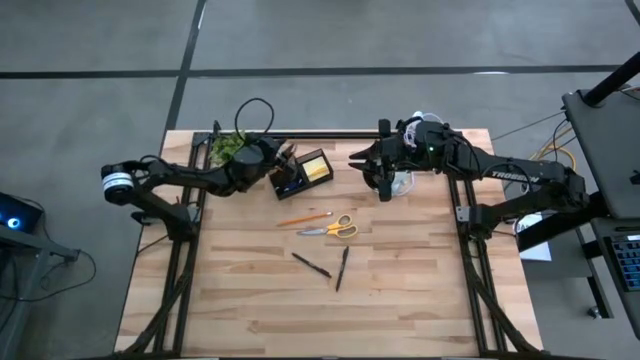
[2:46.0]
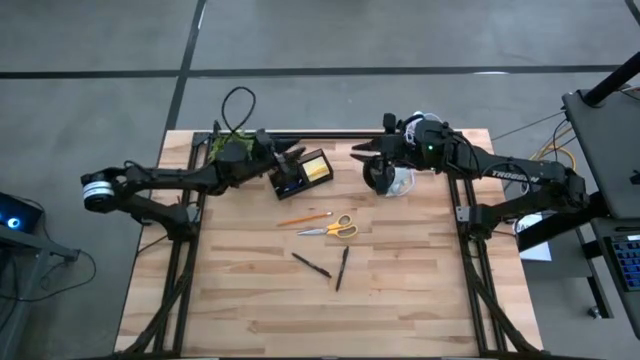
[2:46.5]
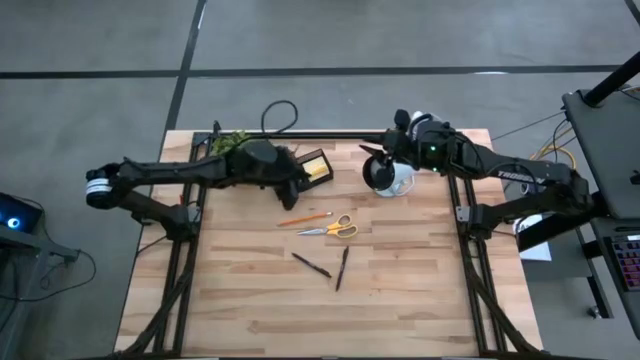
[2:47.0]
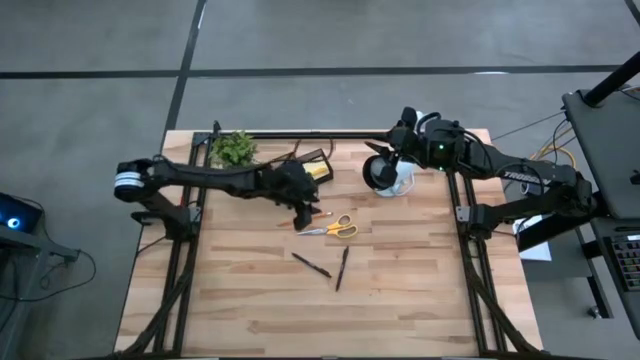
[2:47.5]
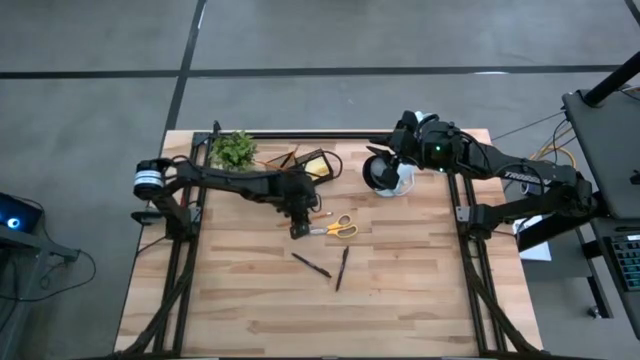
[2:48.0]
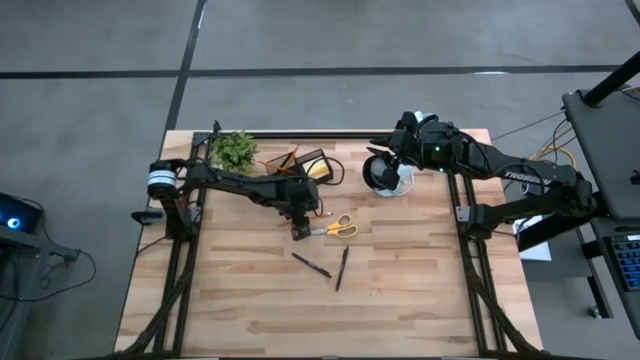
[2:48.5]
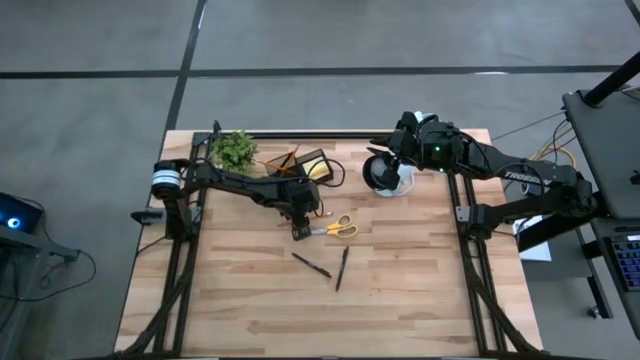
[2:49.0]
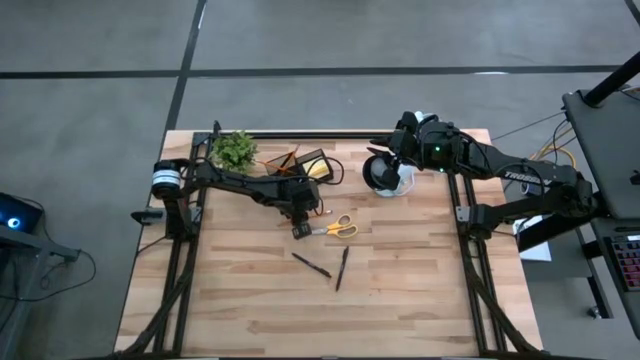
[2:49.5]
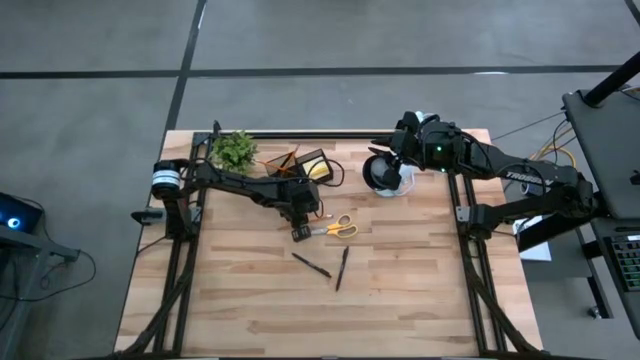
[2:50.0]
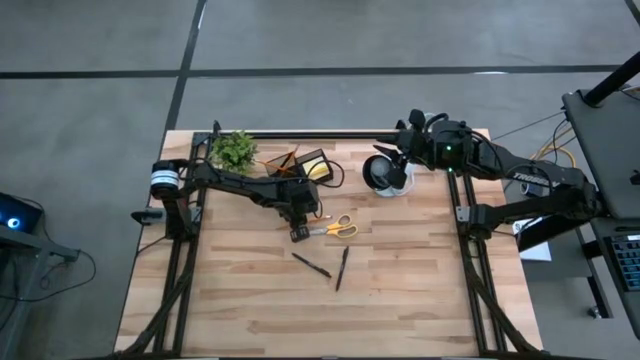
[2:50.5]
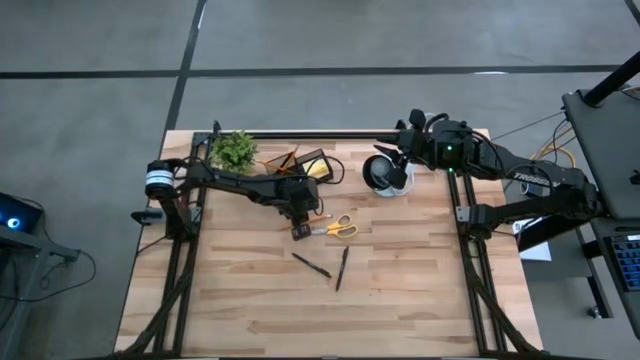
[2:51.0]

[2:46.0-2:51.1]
Task: Pick and place office supplies into organizer
Put the yellow pencil into the black desk organizer

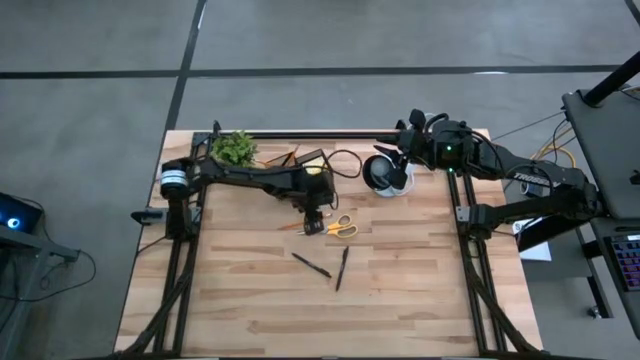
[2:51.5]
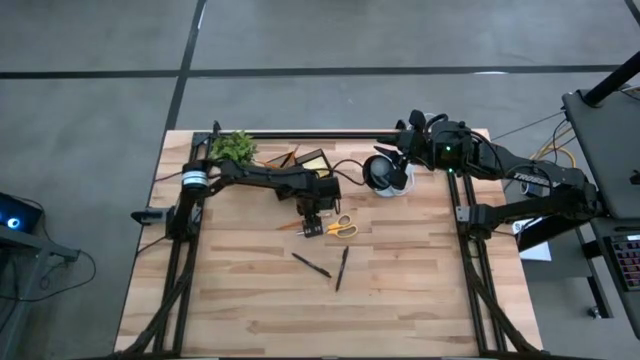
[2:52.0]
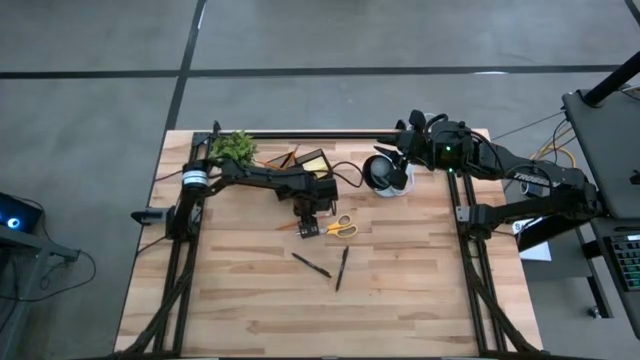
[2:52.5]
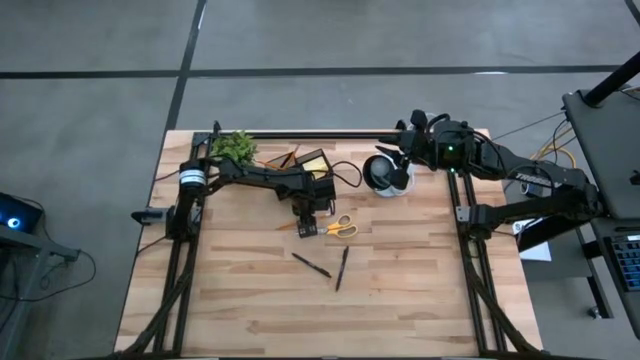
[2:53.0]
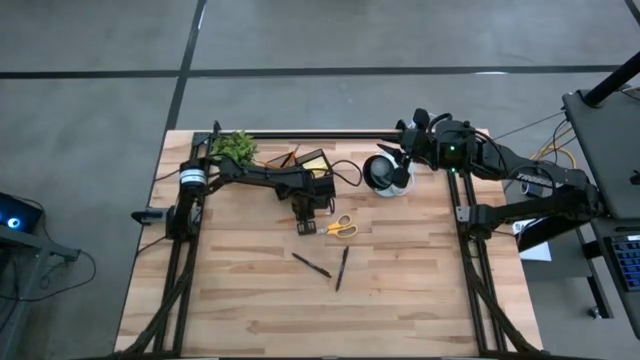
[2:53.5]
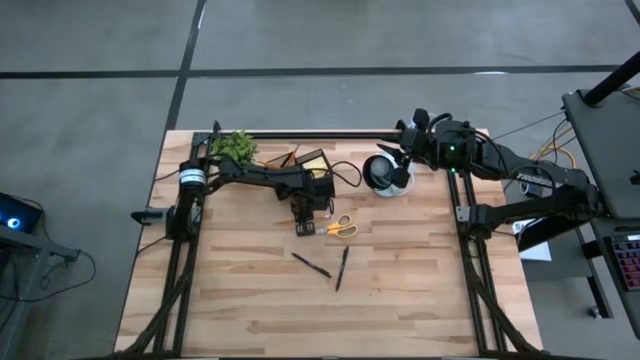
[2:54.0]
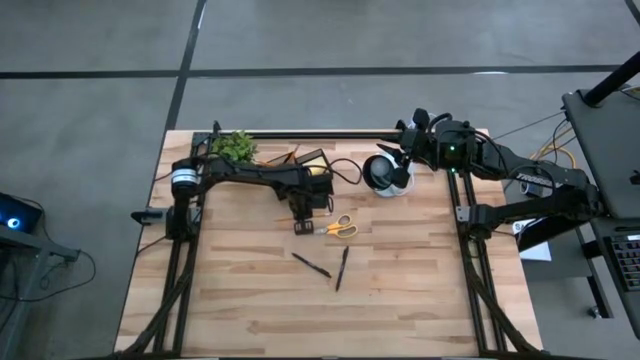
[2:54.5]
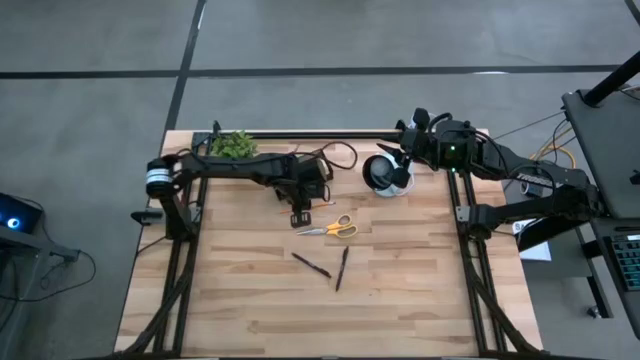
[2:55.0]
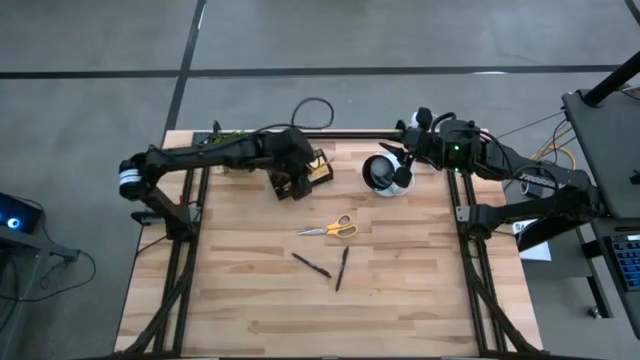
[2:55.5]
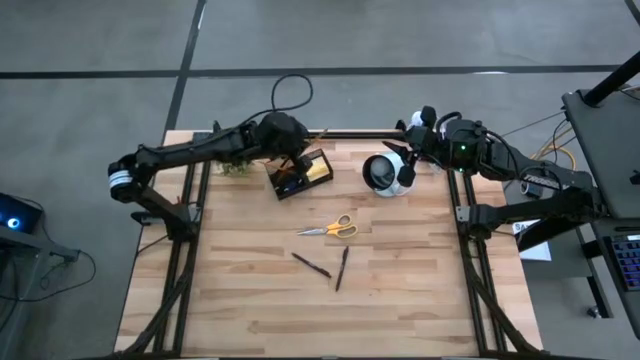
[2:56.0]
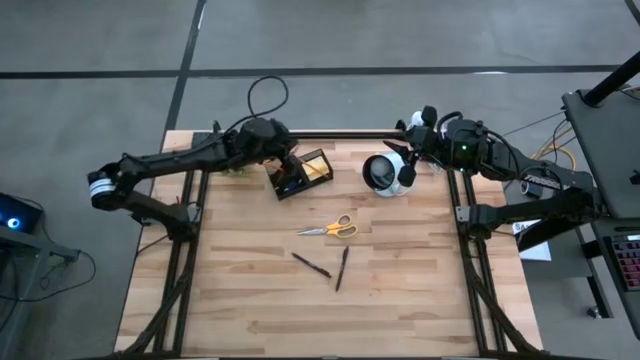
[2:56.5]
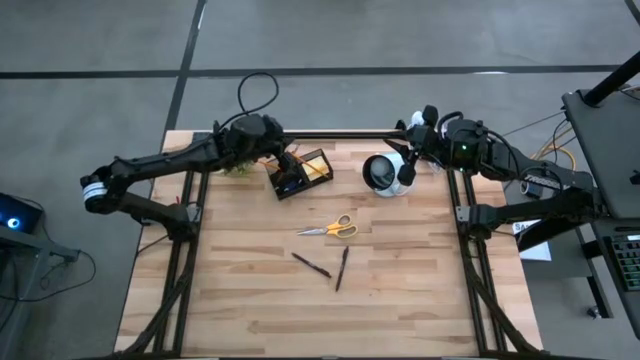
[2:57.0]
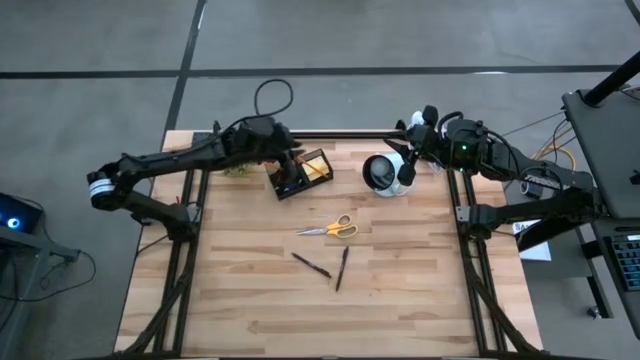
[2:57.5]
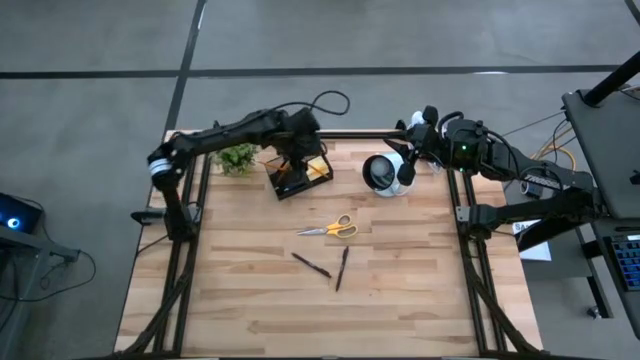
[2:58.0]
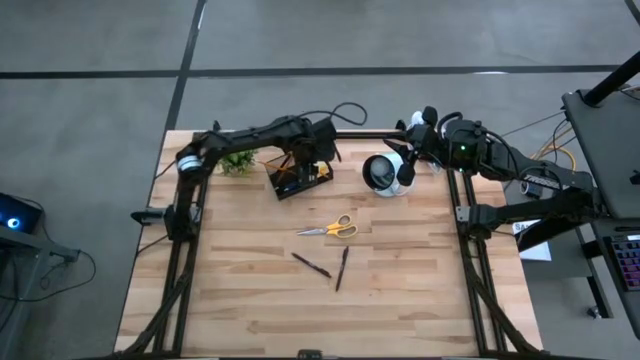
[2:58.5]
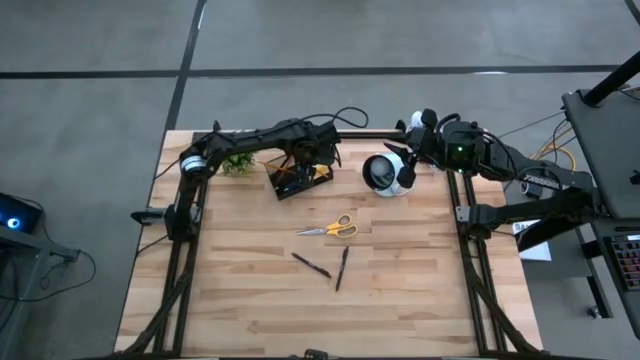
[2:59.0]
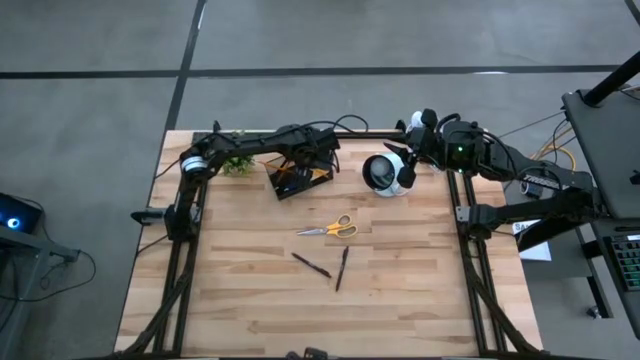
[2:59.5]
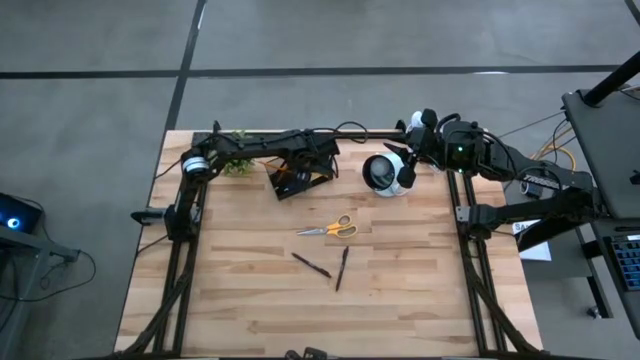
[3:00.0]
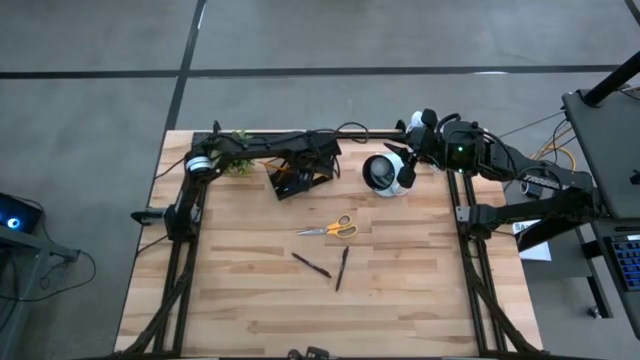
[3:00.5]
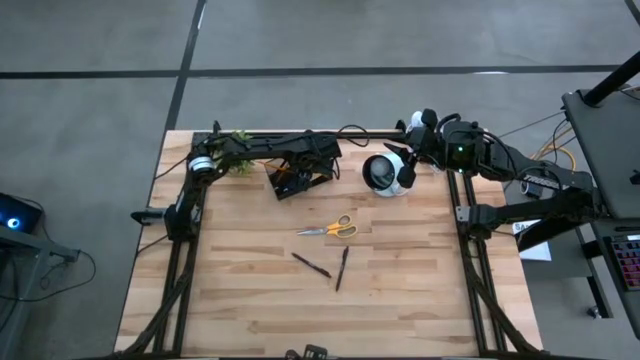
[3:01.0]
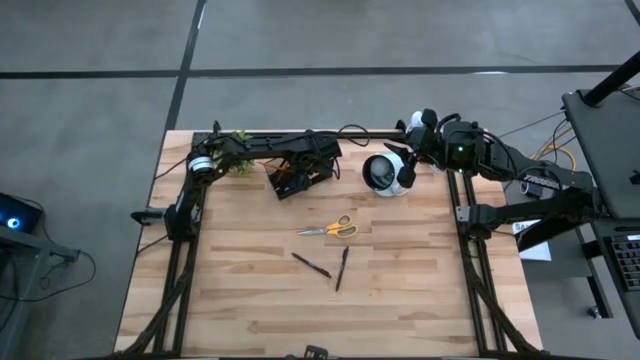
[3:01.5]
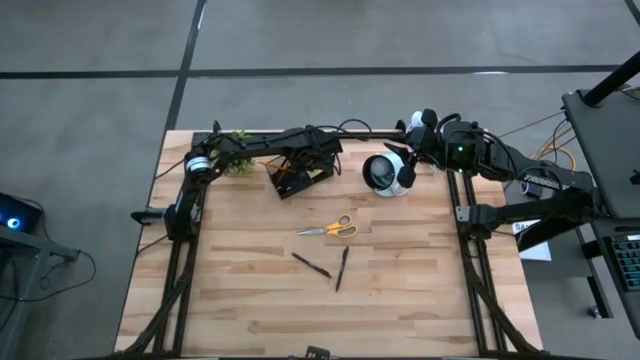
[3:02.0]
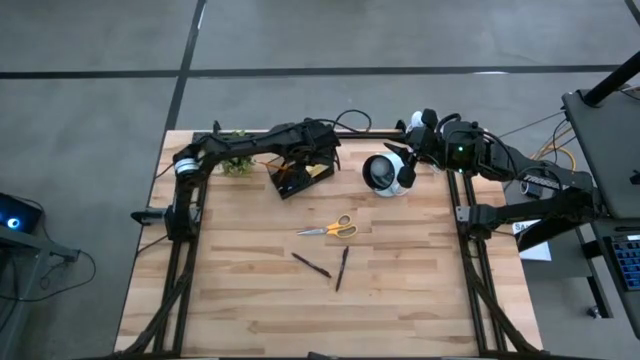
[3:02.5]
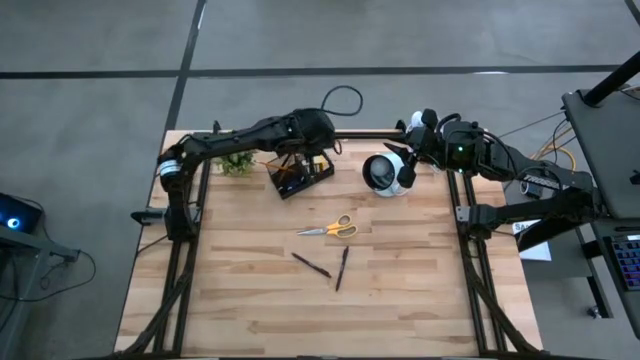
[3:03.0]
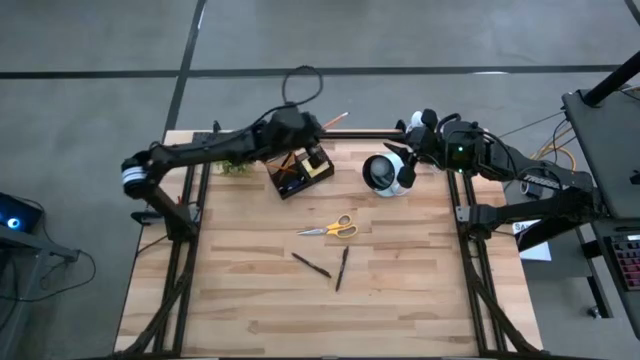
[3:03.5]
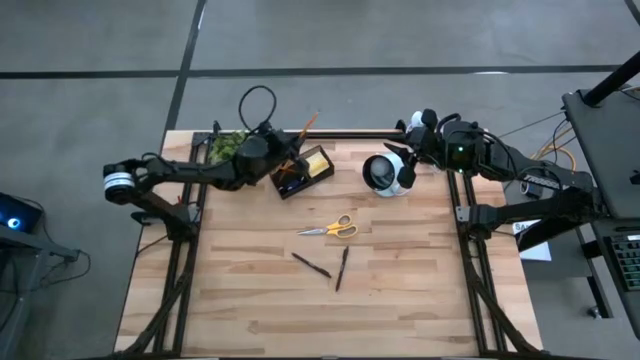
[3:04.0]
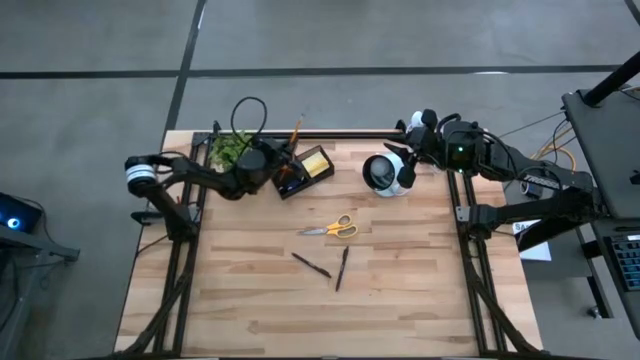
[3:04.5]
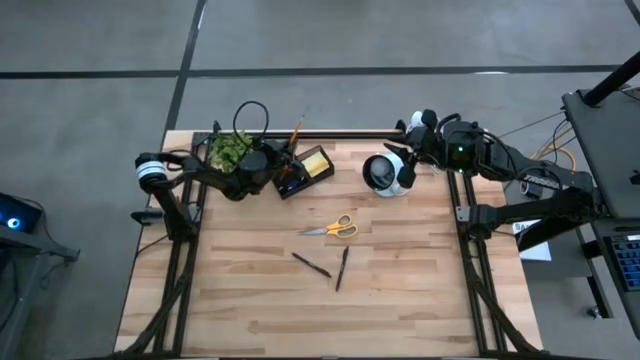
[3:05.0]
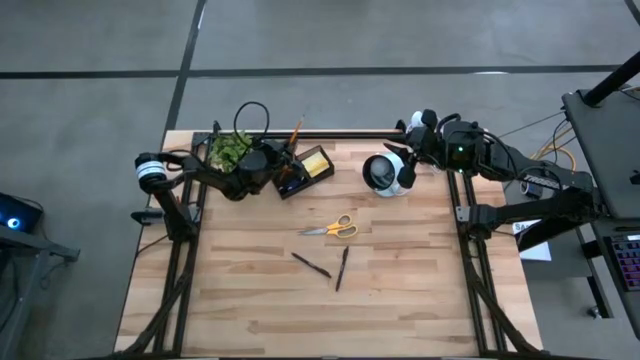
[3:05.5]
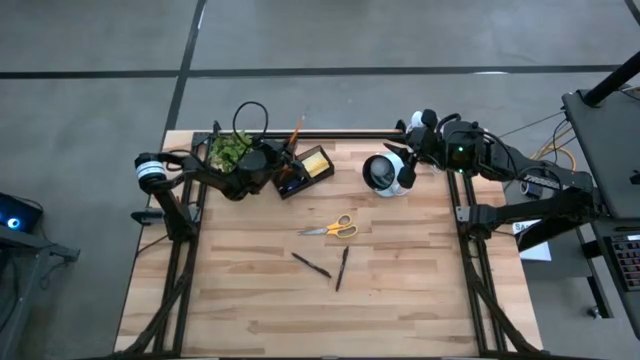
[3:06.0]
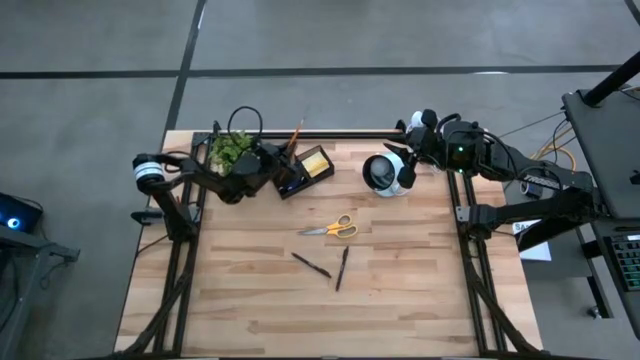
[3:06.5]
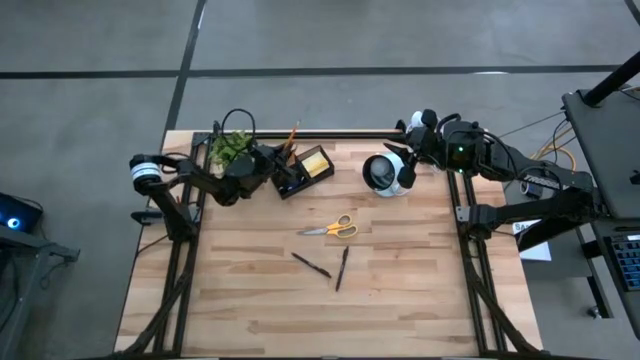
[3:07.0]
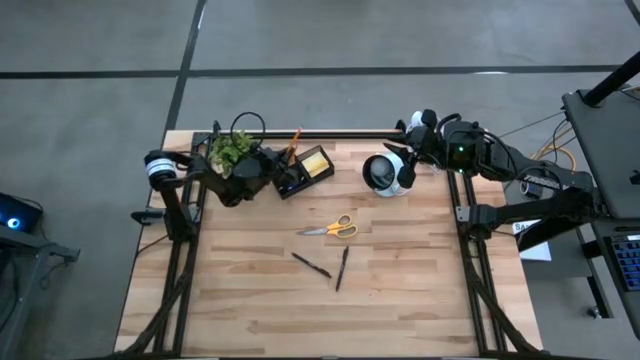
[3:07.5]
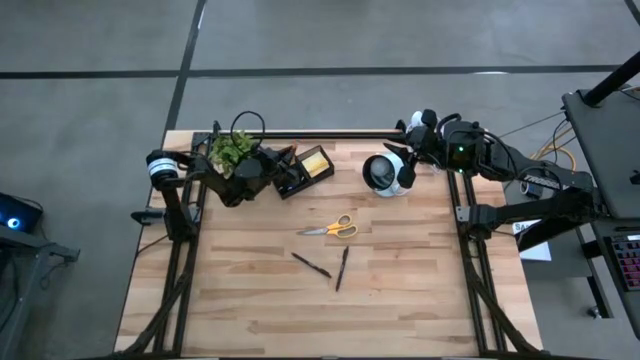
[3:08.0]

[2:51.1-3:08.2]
Put the yellow pencil into the black desk organizer
